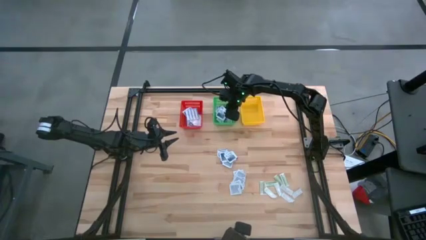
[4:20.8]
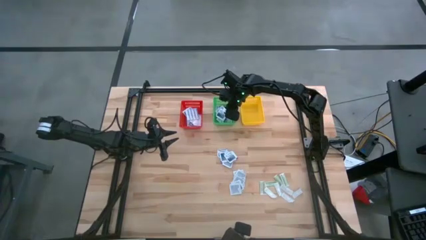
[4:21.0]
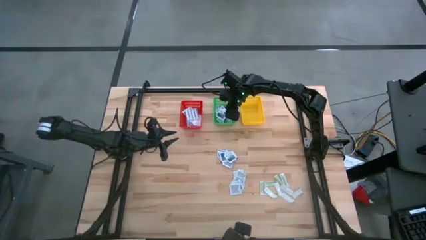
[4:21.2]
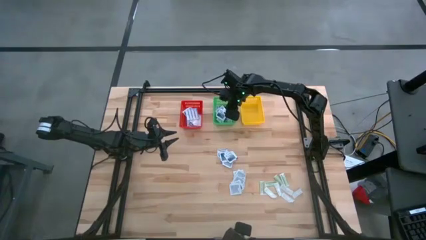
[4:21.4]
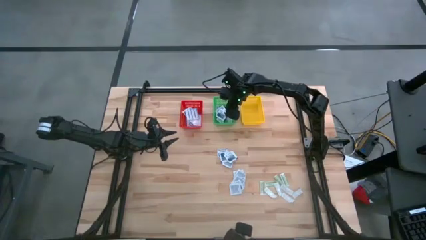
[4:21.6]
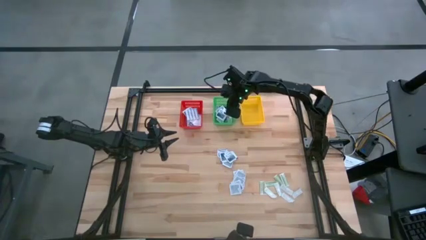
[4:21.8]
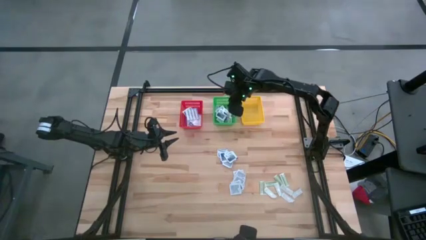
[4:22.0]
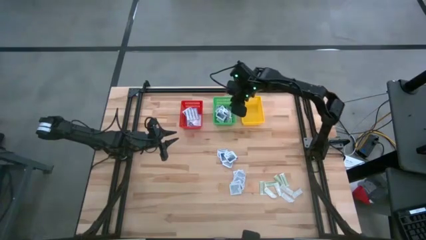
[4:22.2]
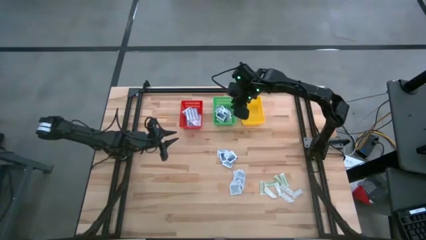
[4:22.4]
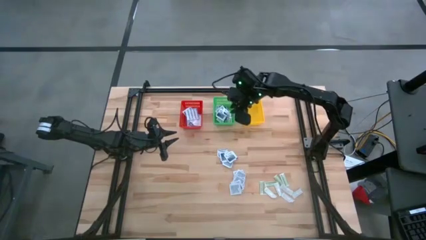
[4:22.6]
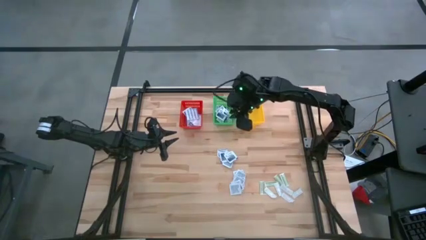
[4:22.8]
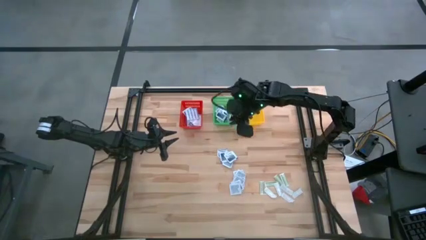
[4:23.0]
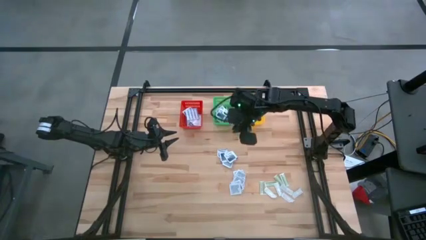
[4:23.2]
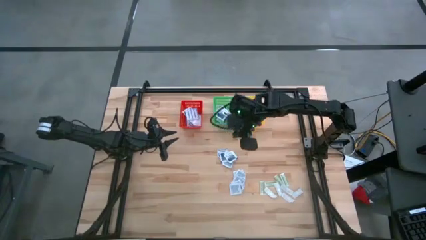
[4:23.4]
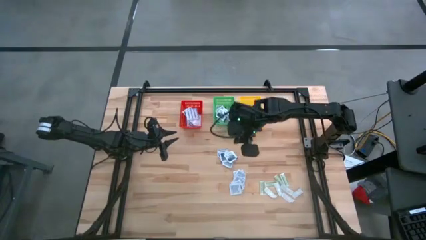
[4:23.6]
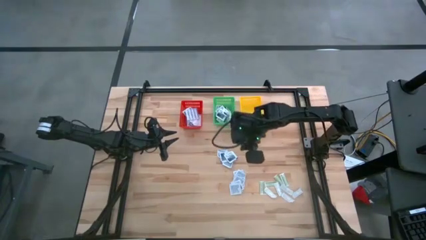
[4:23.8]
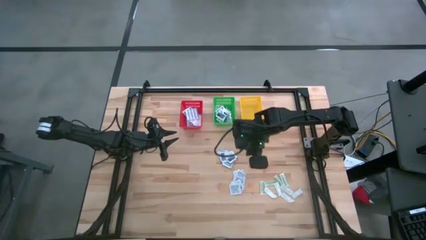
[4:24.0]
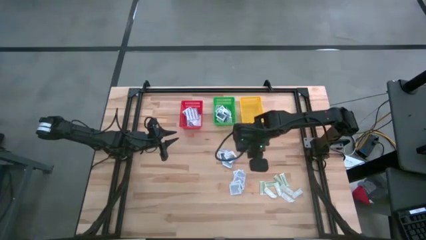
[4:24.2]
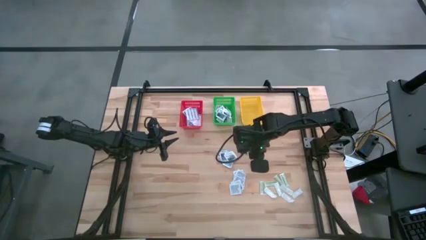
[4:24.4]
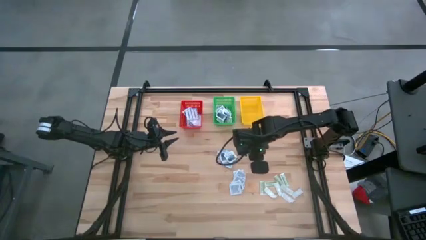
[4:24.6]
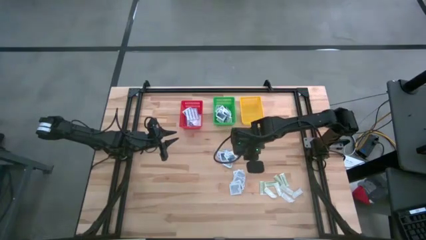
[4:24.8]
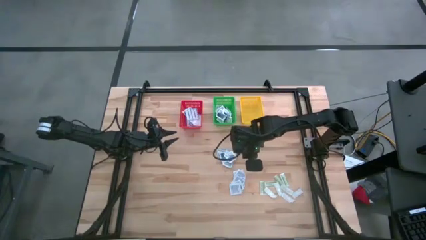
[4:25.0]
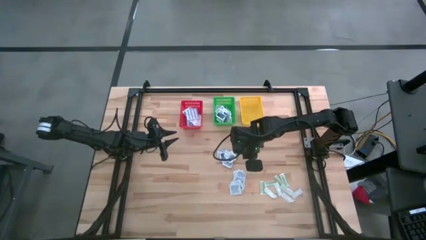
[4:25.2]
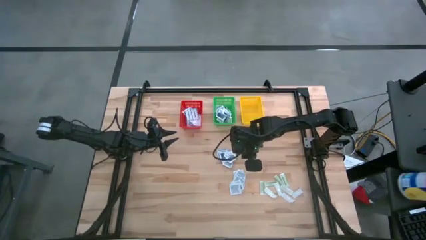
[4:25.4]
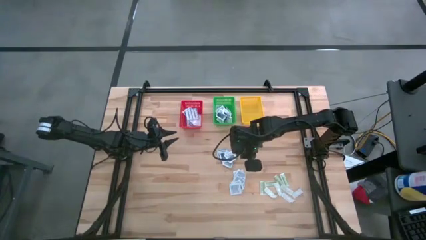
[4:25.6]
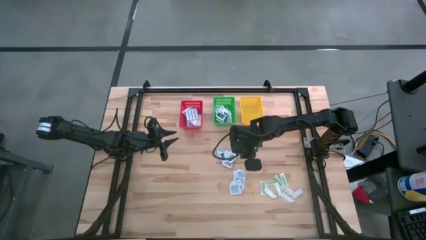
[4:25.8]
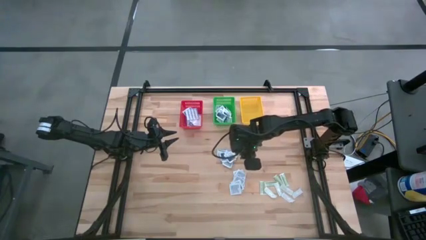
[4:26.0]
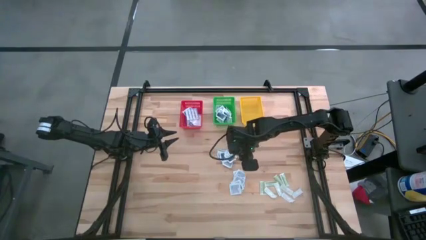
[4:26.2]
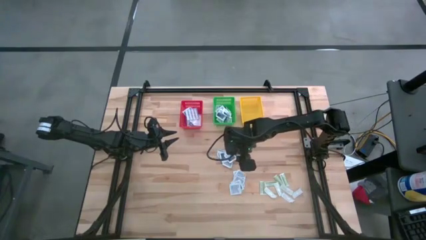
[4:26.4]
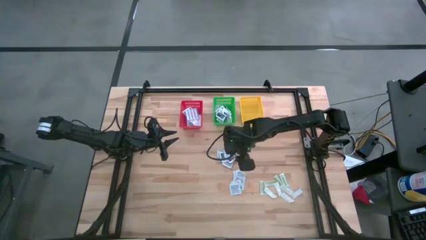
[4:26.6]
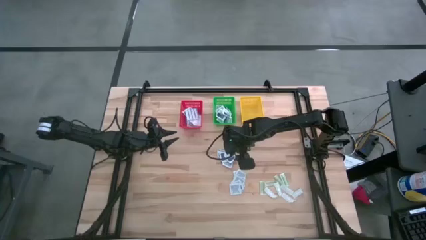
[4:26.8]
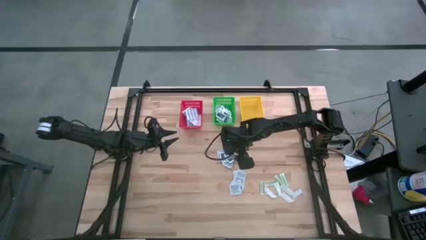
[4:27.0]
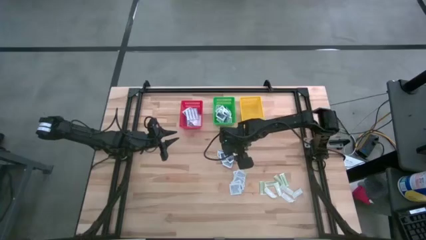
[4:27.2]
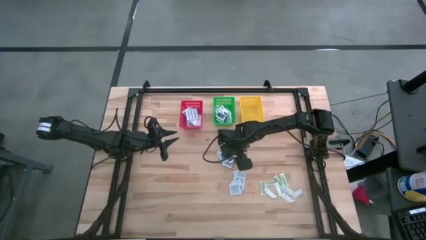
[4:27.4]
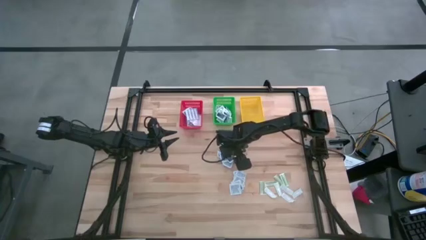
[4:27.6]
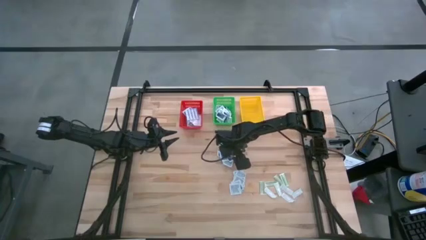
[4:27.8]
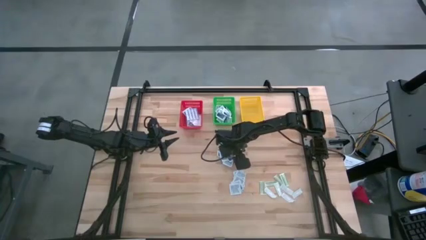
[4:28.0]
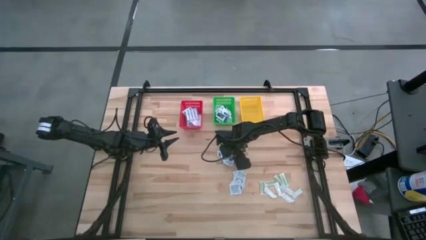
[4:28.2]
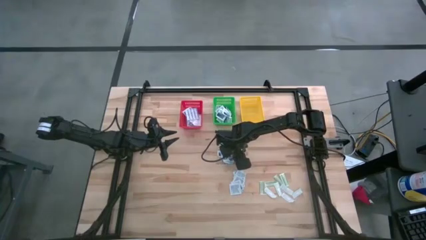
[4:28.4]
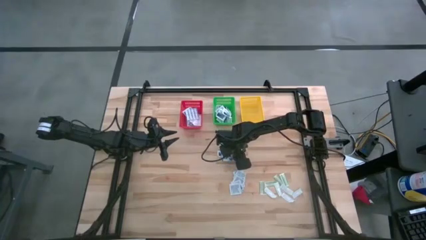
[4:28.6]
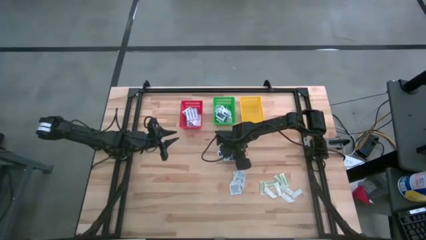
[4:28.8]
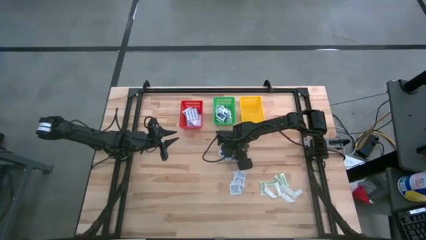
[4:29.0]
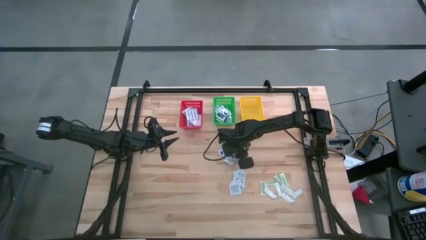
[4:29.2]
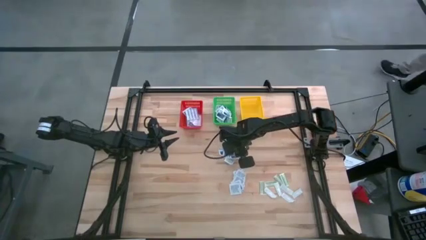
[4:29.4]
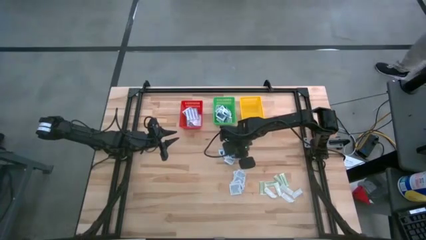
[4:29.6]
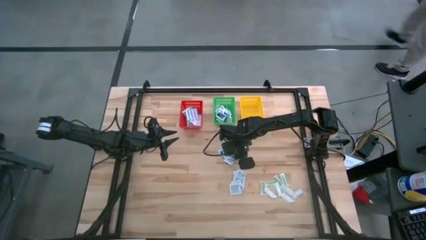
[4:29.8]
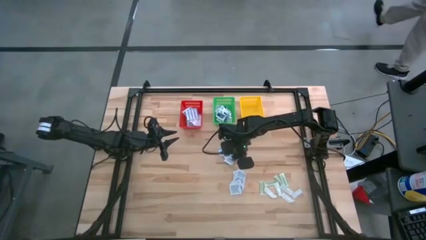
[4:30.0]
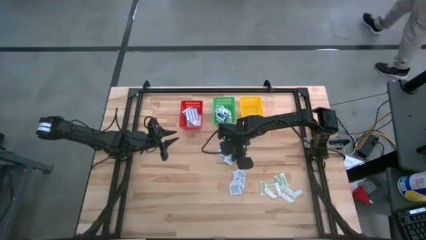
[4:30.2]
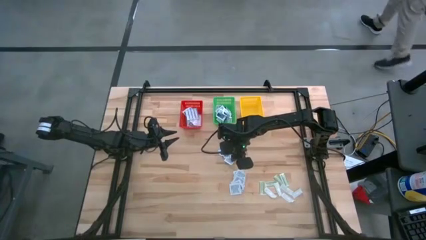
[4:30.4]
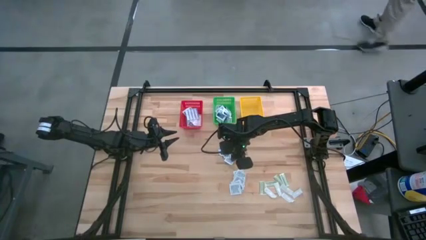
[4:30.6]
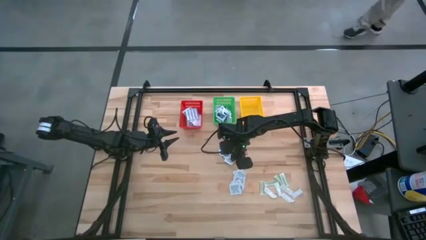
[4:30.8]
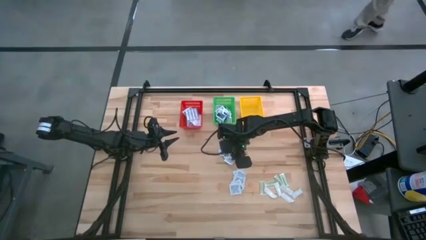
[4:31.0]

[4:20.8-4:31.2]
Task: Pick & Place First Aid Supplies
Put the alcohol pad into the green basket

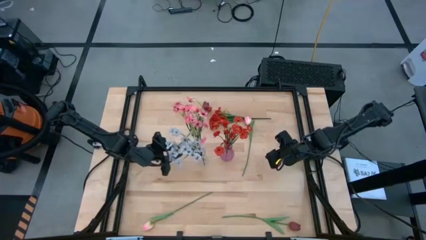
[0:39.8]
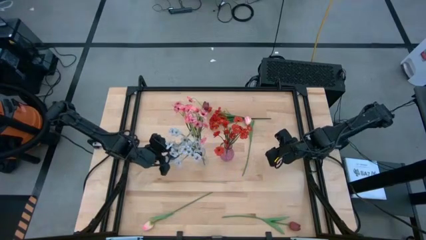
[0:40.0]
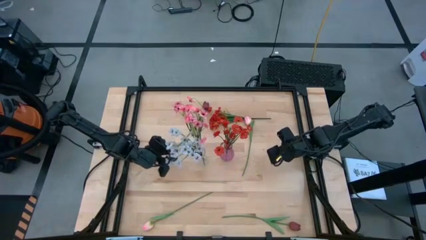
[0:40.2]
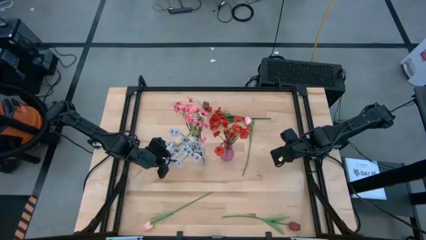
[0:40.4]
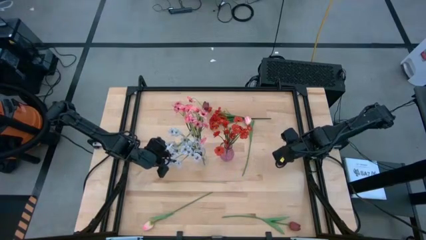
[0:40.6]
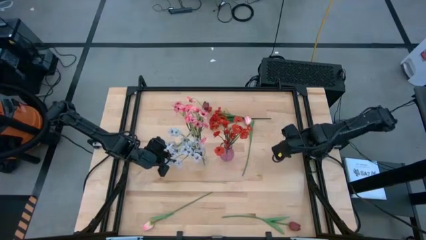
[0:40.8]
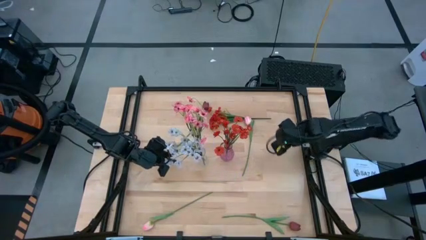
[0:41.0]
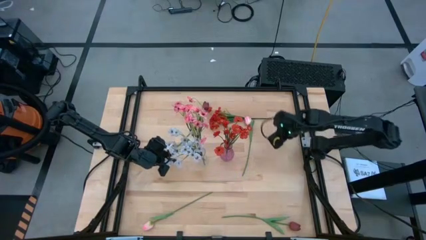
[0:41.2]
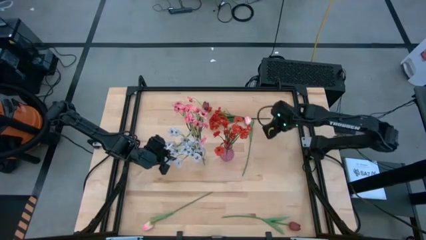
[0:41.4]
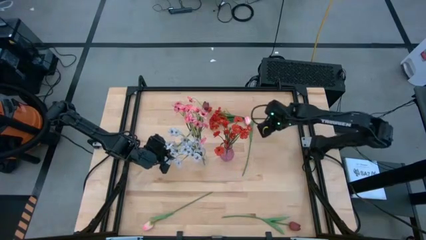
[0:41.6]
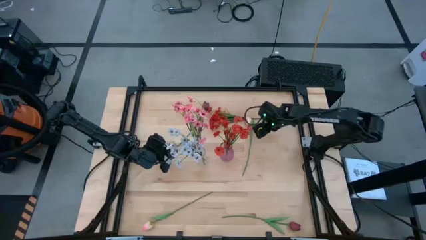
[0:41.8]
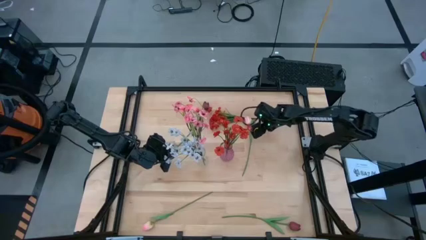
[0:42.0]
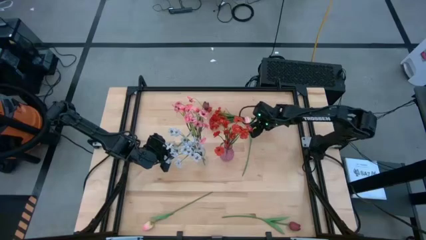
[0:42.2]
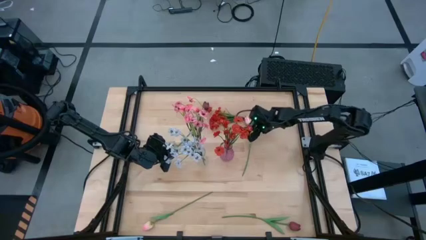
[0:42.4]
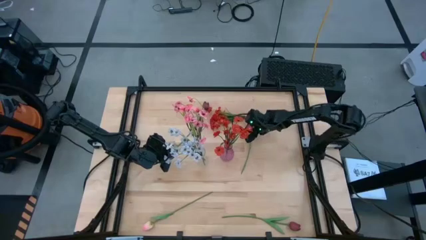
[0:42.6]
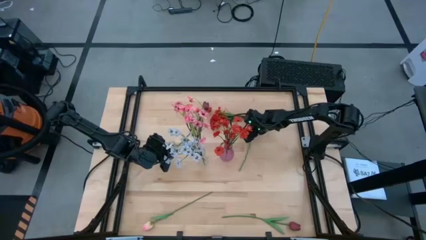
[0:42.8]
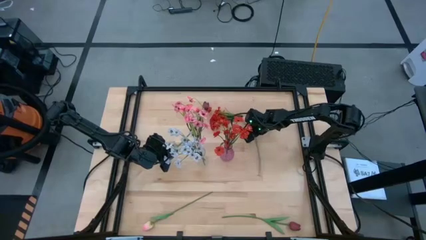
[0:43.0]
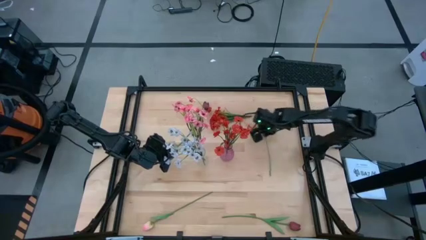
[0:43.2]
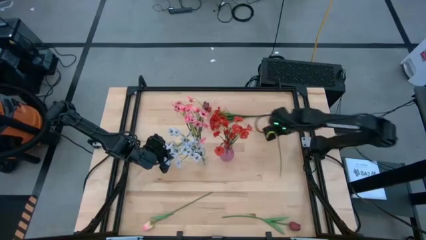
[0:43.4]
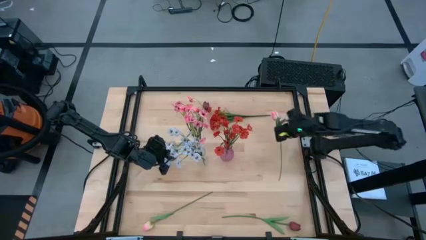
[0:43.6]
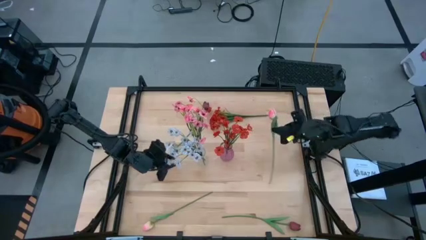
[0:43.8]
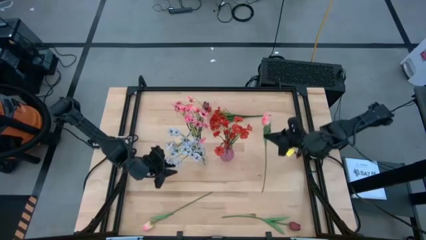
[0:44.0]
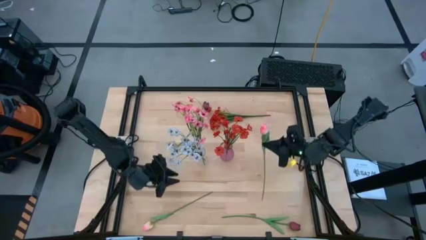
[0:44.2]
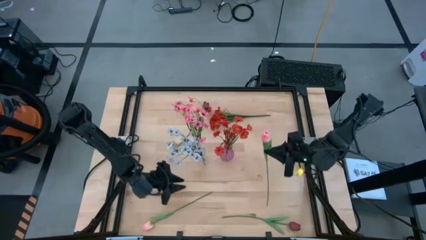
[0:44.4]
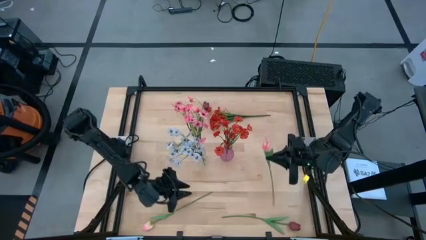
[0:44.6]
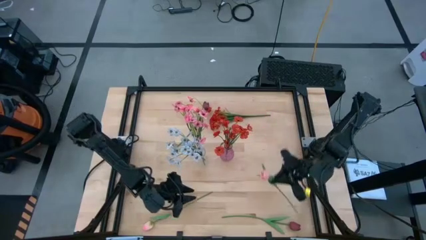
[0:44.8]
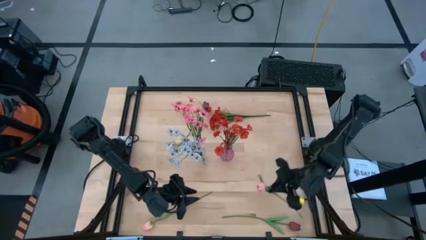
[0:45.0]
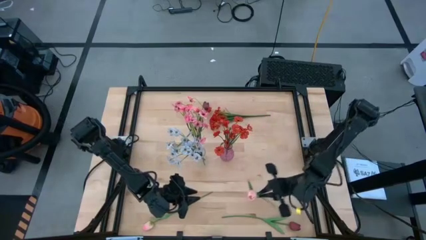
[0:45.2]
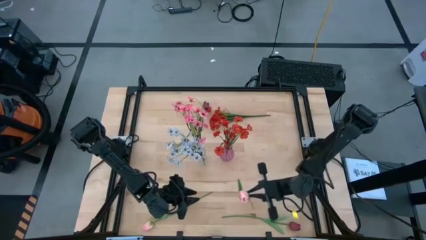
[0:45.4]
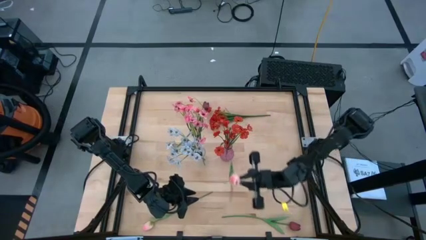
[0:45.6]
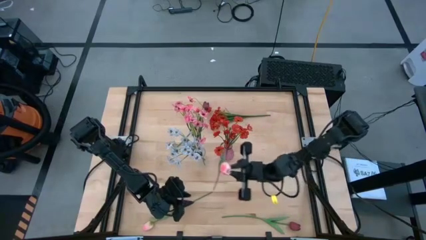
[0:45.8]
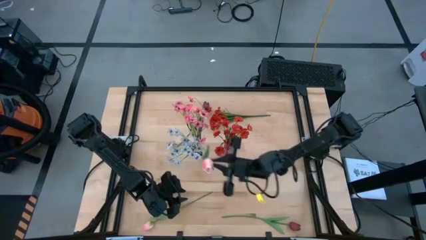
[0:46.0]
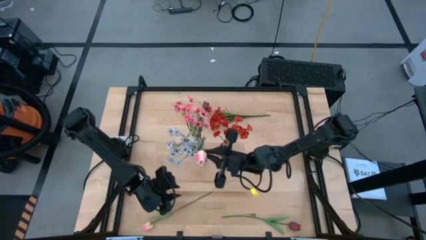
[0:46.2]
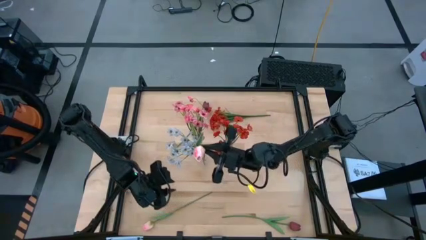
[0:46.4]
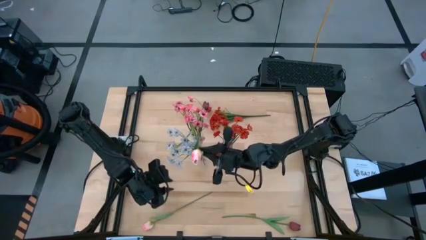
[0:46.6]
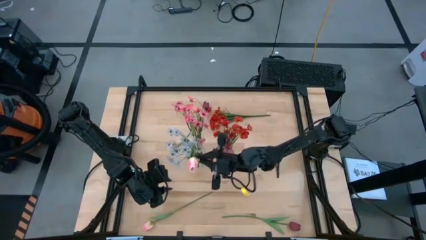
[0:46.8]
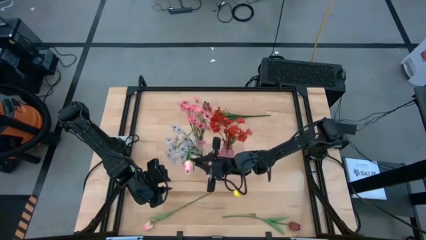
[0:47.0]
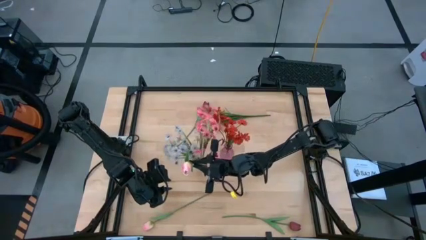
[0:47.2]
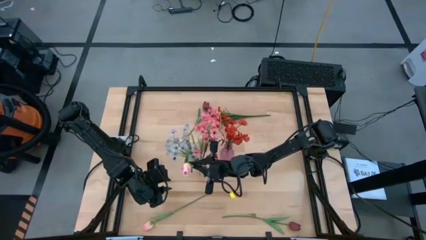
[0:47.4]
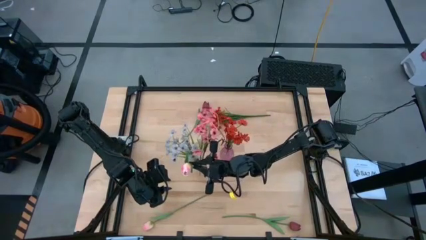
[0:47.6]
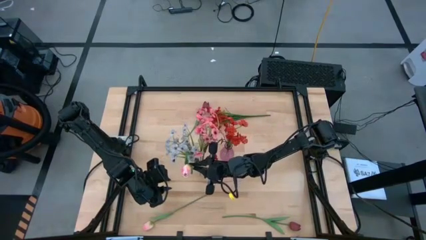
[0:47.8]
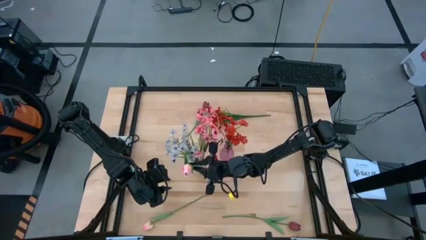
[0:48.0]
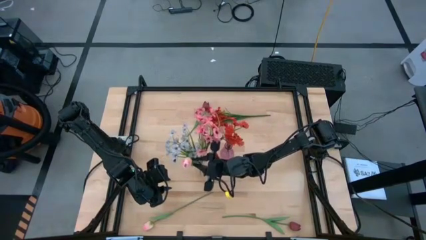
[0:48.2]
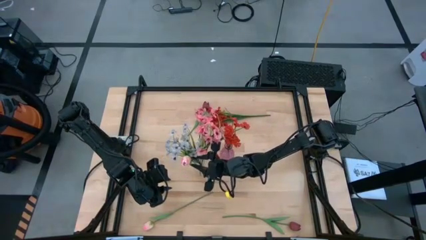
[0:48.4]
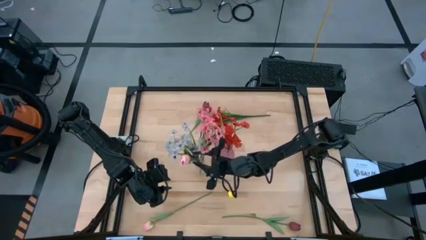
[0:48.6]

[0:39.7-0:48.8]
Task: Sort flowers into vase by color
Put the top pink flower into the transparent vase
